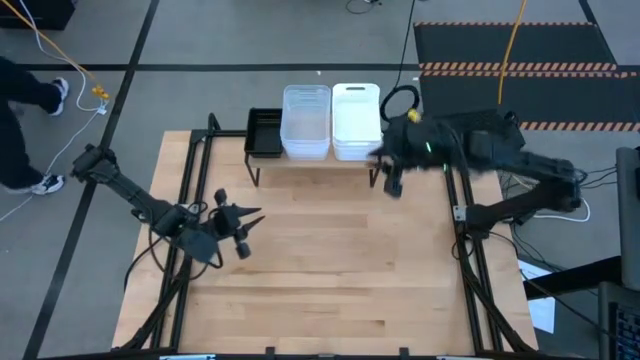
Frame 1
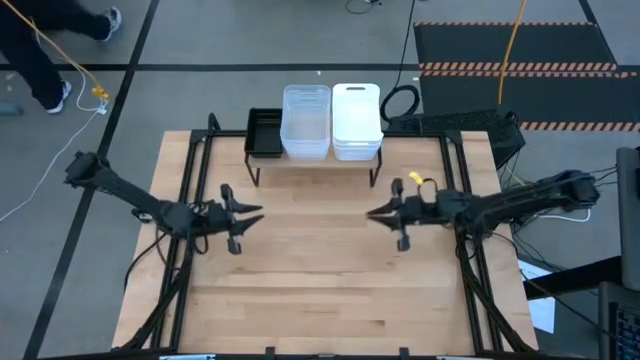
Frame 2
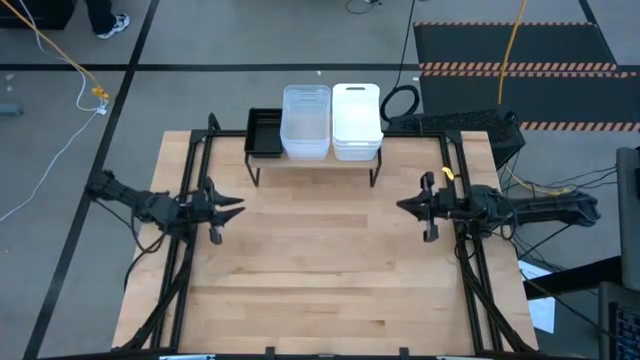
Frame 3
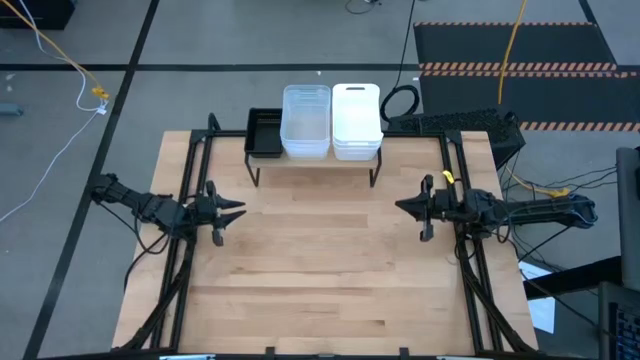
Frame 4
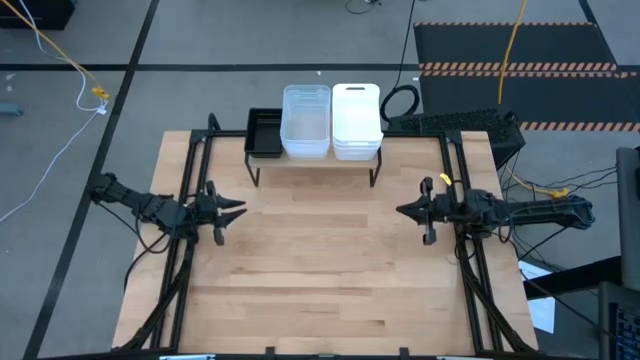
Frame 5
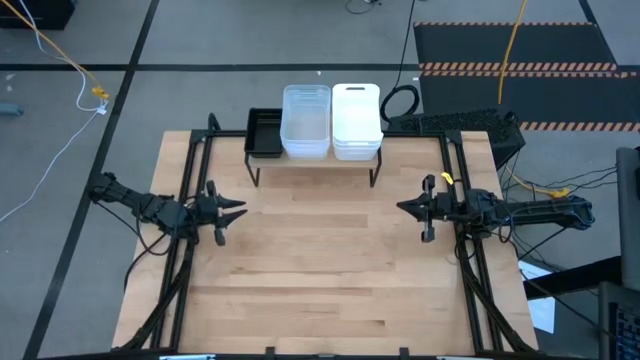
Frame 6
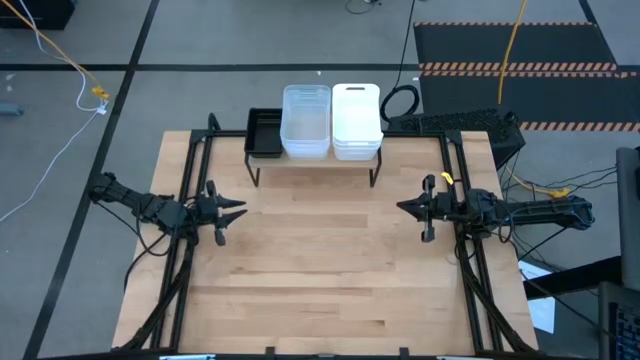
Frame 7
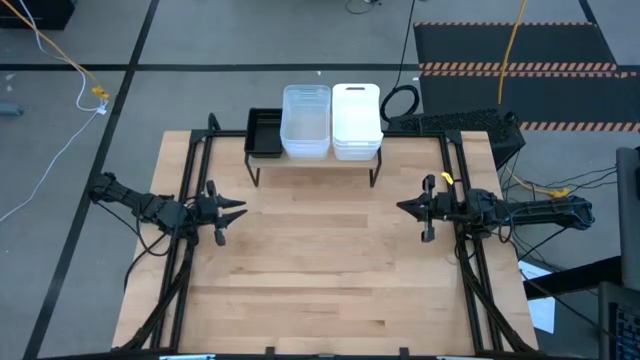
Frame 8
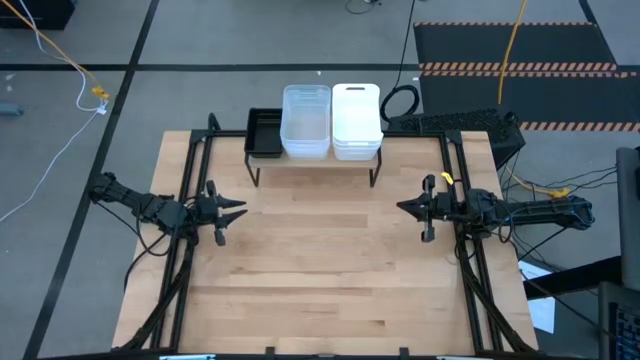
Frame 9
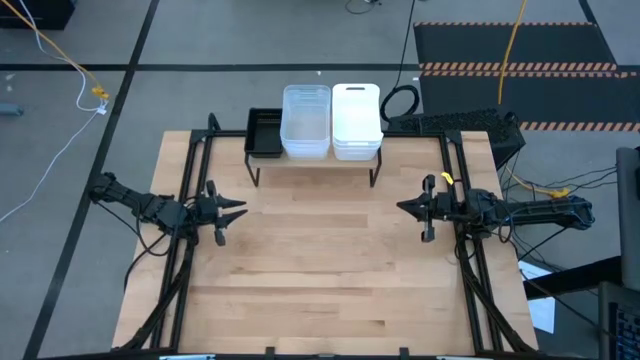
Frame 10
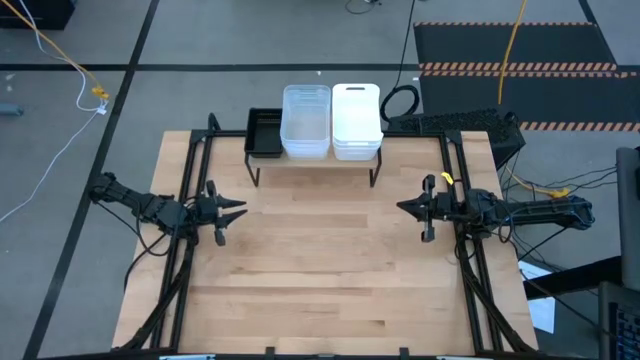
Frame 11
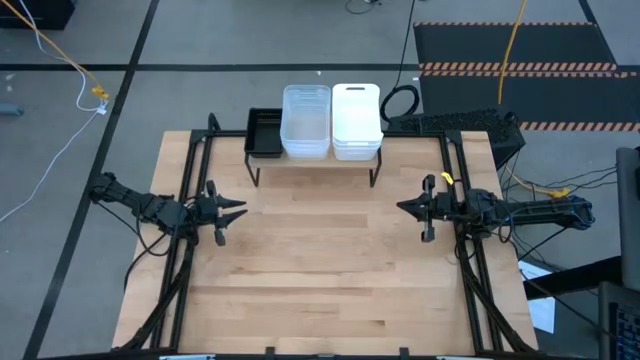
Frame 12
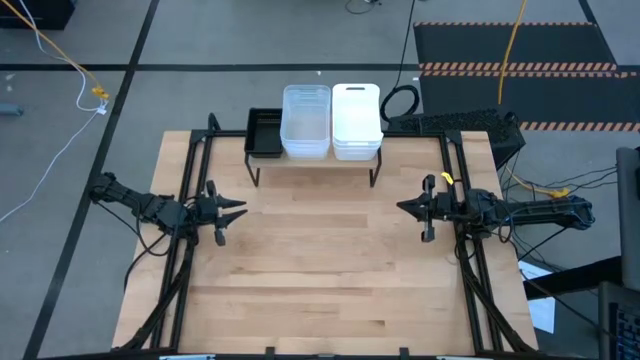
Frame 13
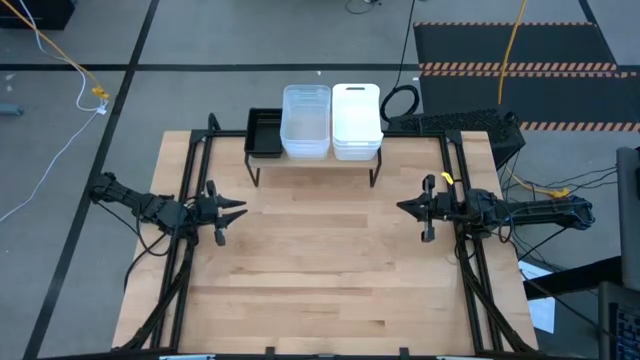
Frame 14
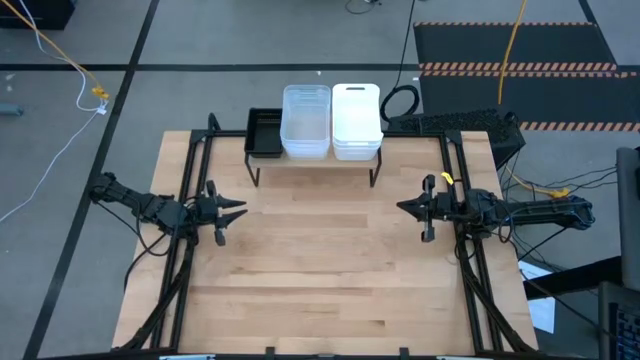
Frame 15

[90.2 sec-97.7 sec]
Task: Stack baskets on shelf by color
Return to Home Position

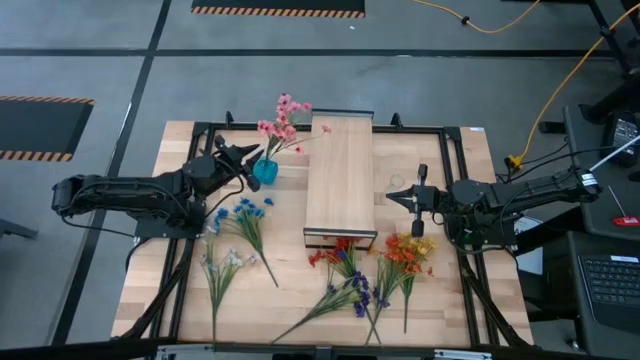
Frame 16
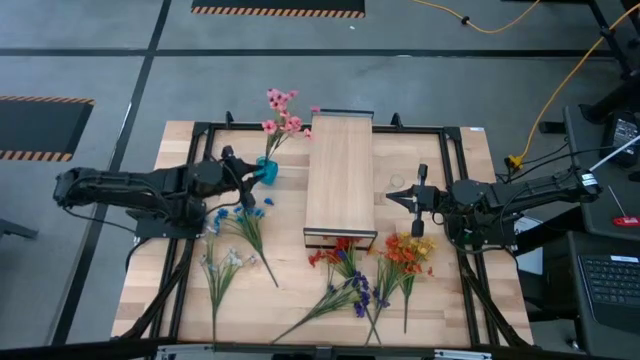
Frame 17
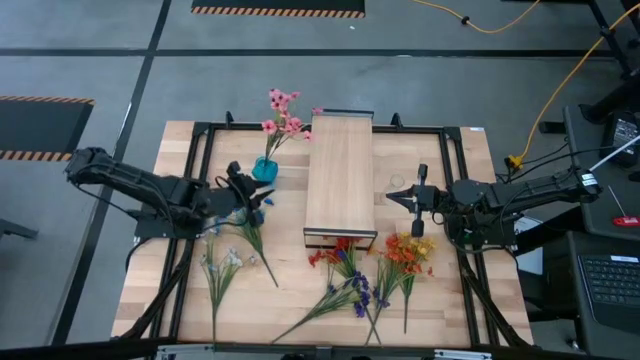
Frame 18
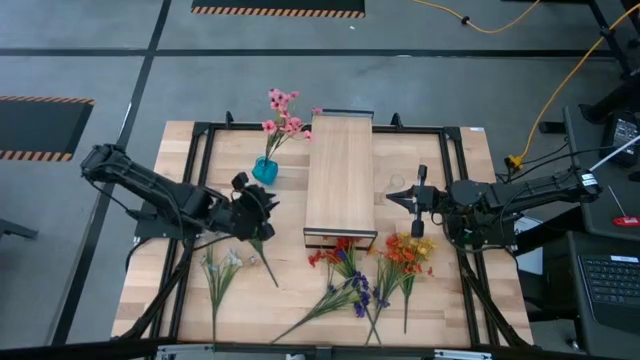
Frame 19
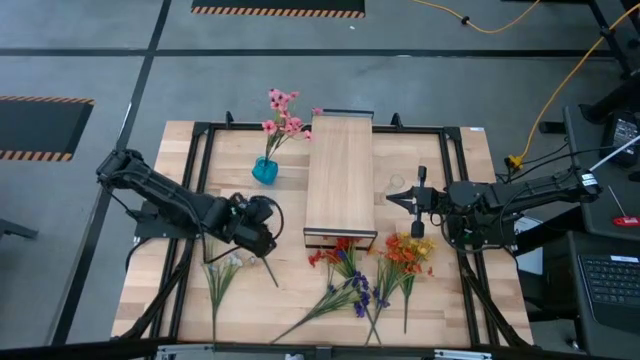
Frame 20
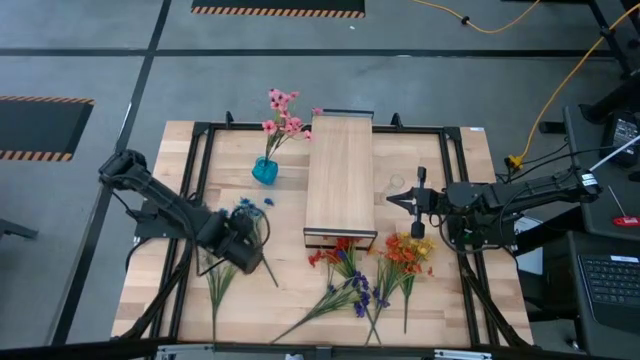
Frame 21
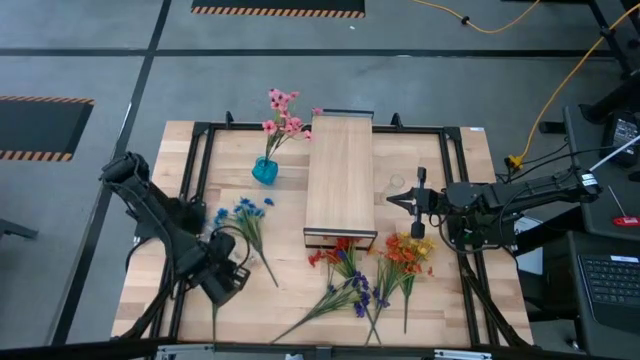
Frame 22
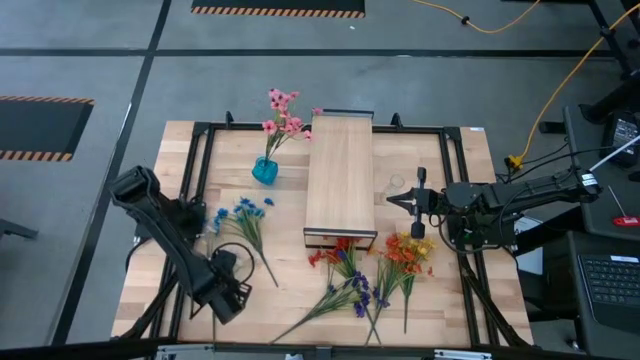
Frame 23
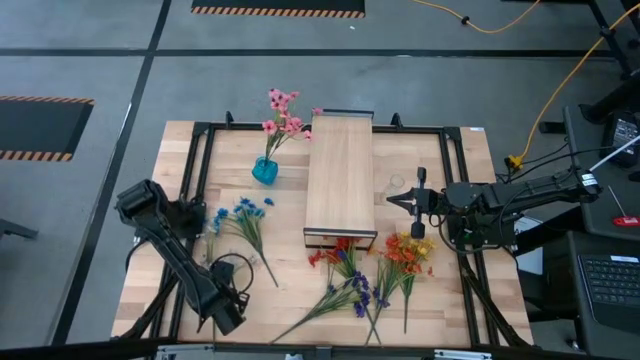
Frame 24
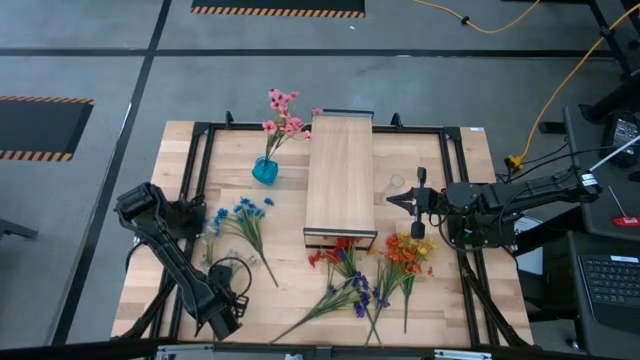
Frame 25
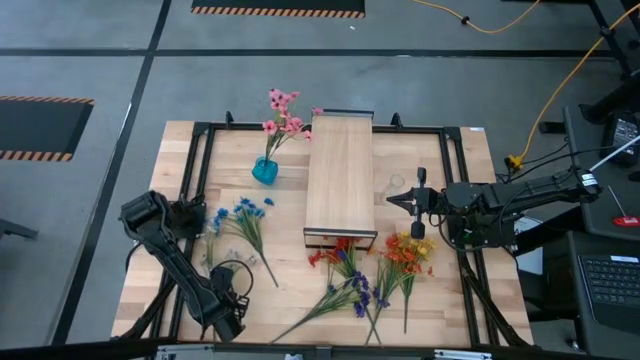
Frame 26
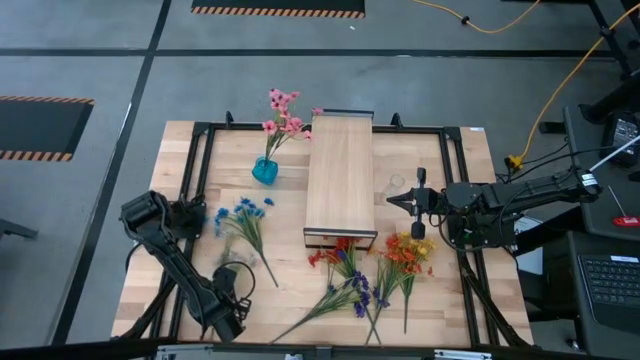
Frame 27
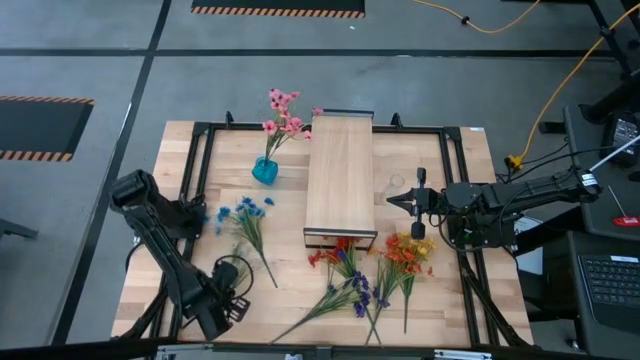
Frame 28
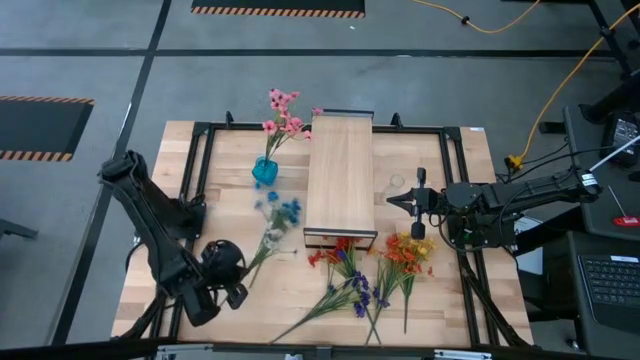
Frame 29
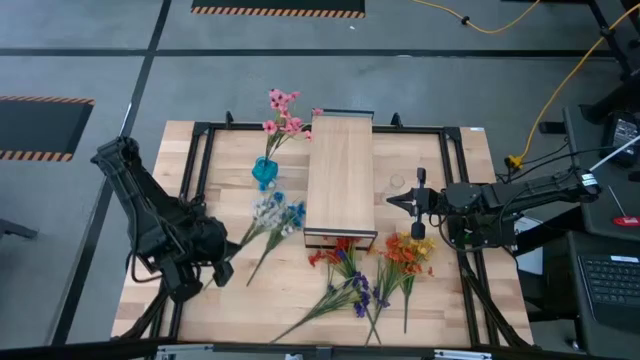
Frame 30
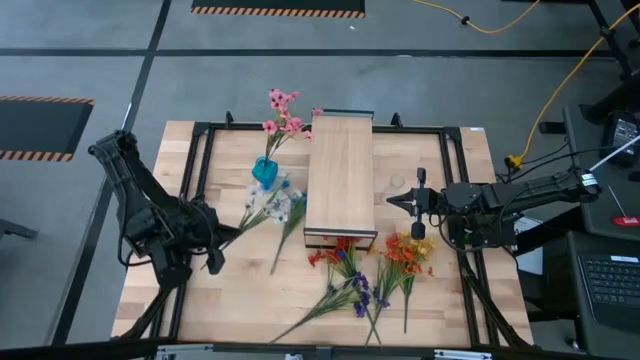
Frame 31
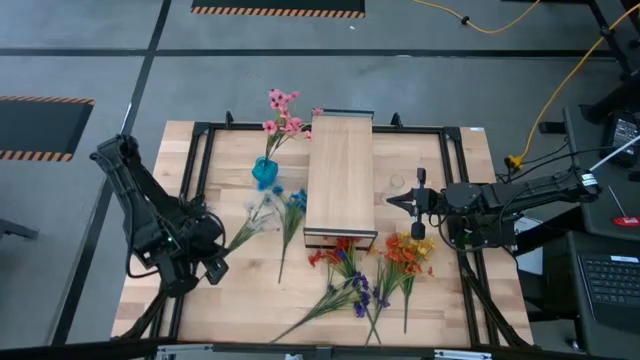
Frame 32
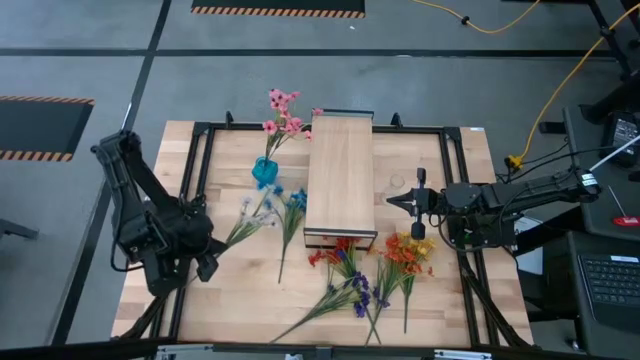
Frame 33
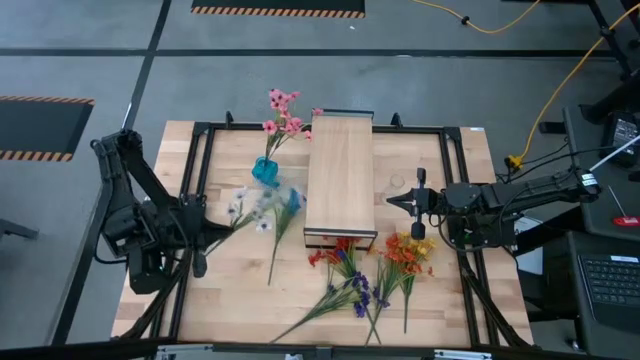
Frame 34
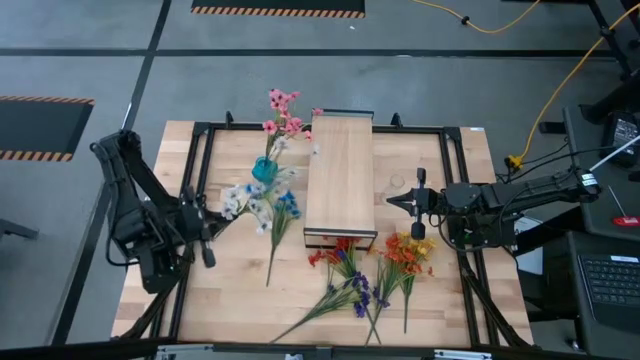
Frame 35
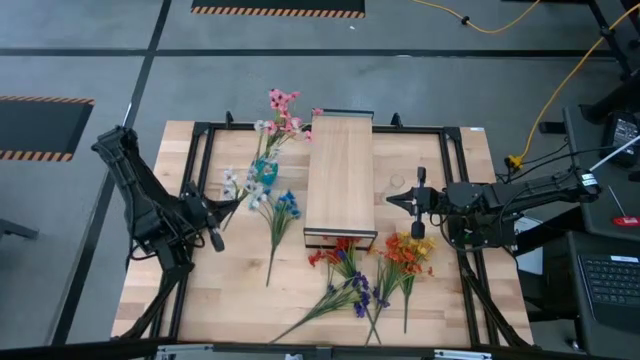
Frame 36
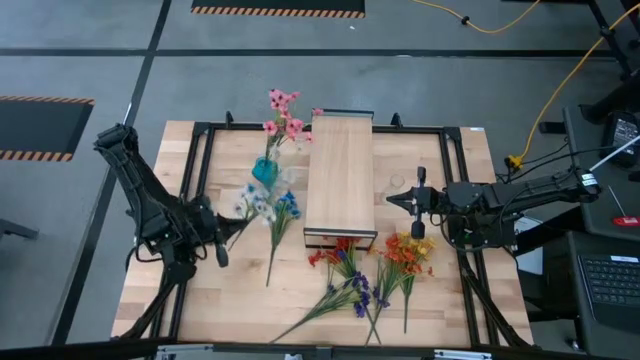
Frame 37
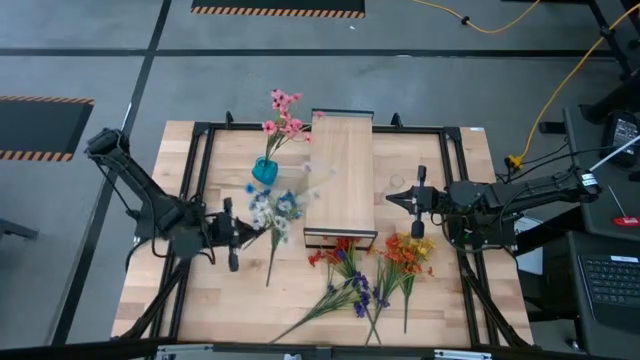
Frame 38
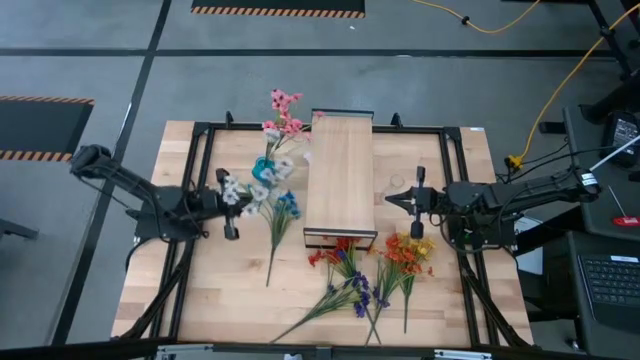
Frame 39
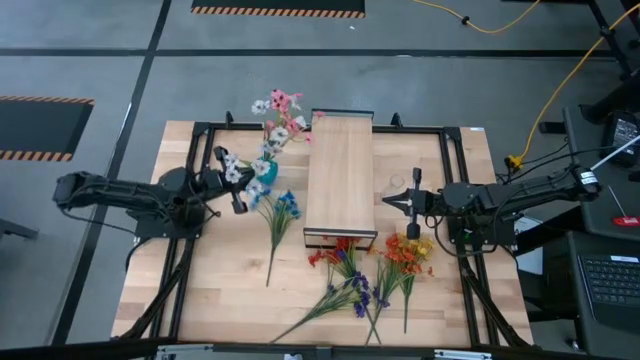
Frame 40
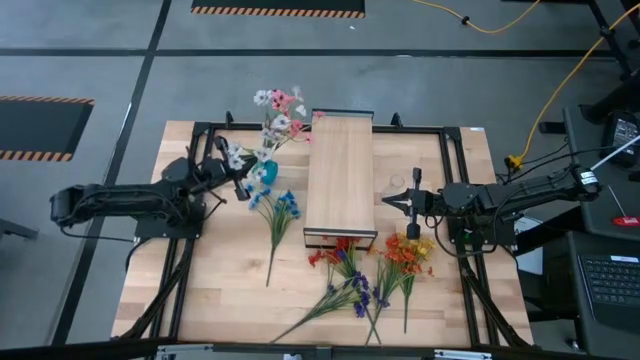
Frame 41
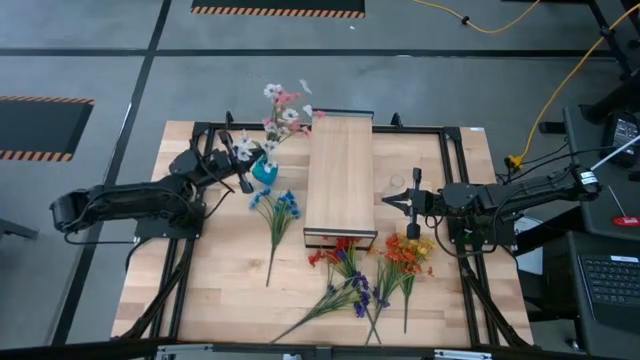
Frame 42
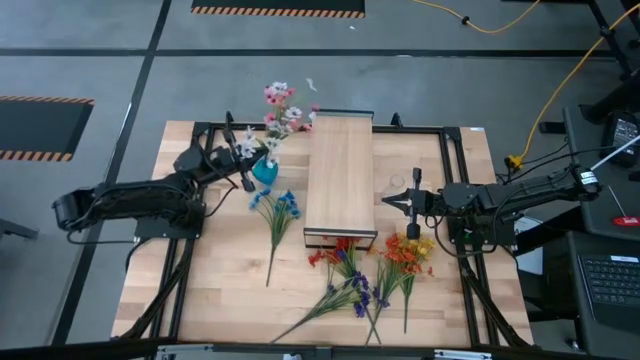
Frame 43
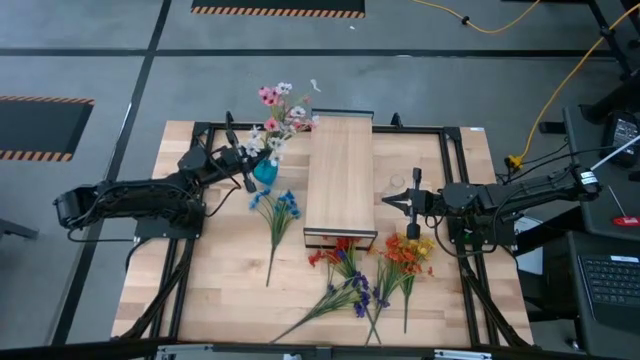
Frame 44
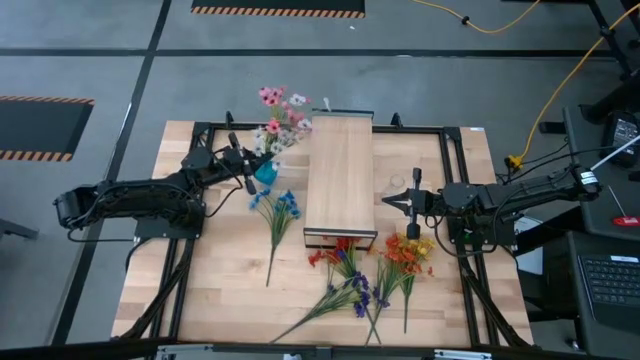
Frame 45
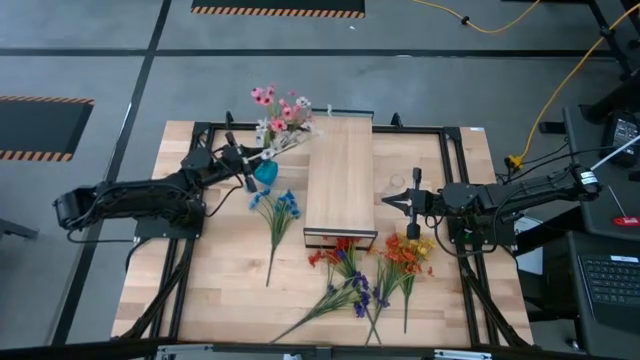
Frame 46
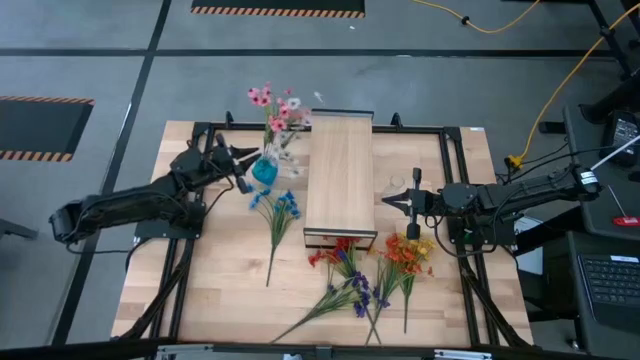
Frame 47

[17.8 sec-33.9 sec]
Task: Pick and place flowers into a vace then onto a shelf
Put the white flowers into the blue vase
